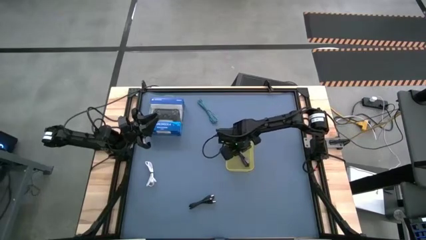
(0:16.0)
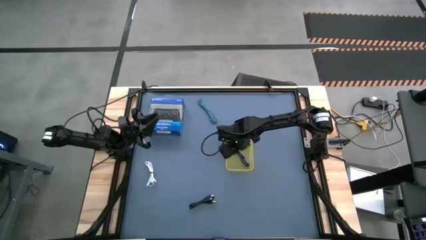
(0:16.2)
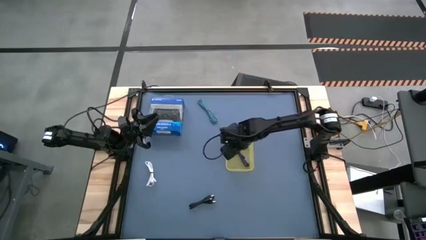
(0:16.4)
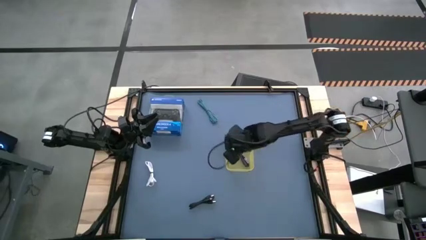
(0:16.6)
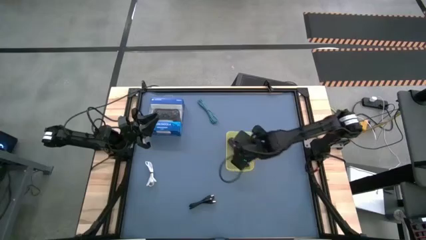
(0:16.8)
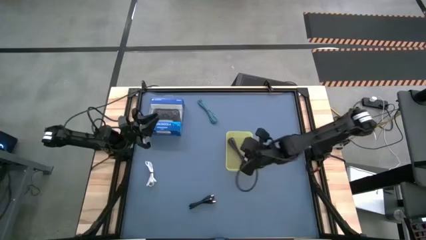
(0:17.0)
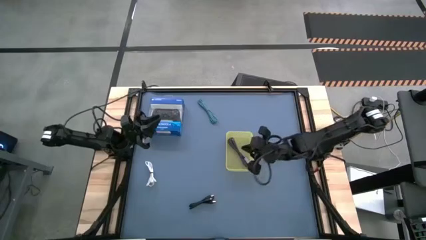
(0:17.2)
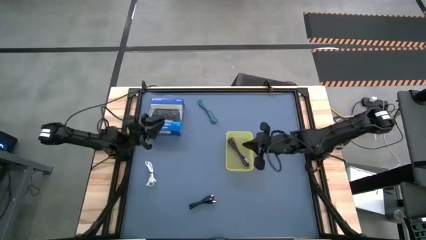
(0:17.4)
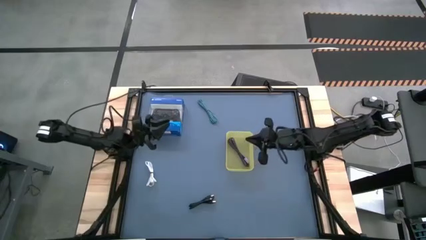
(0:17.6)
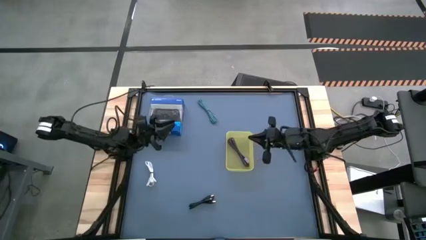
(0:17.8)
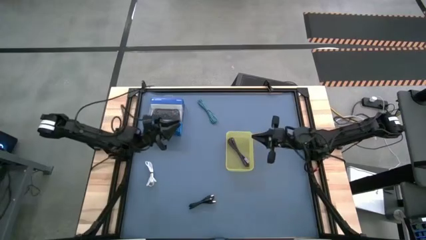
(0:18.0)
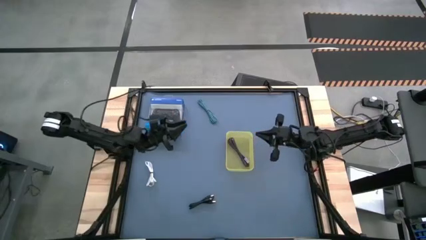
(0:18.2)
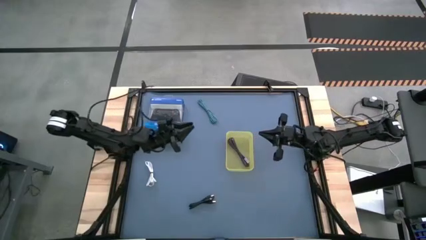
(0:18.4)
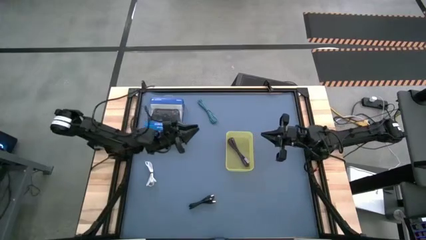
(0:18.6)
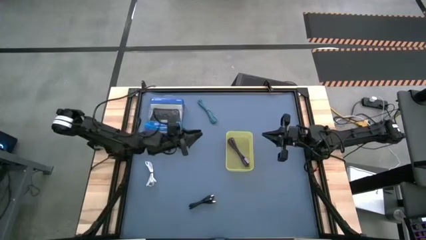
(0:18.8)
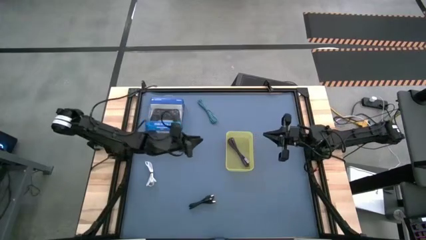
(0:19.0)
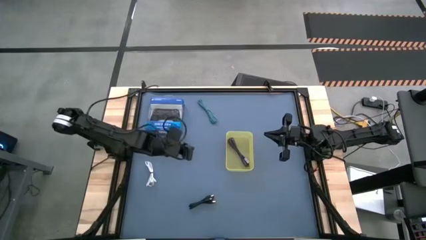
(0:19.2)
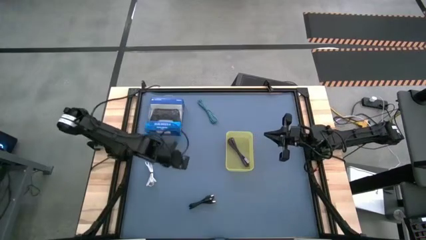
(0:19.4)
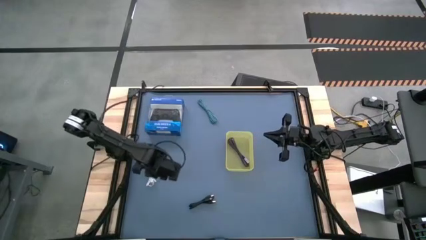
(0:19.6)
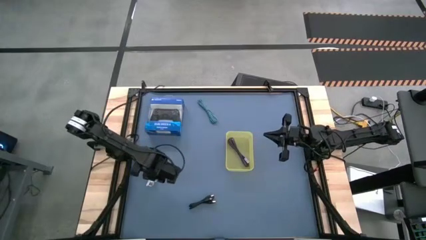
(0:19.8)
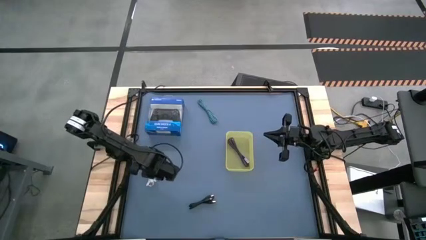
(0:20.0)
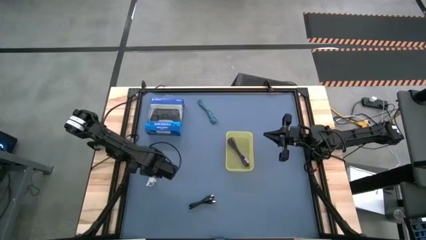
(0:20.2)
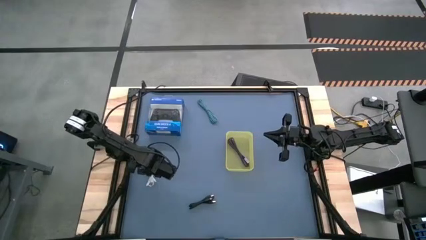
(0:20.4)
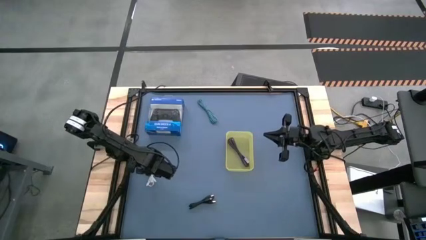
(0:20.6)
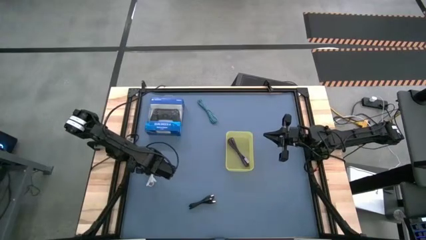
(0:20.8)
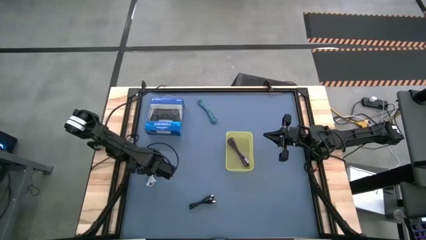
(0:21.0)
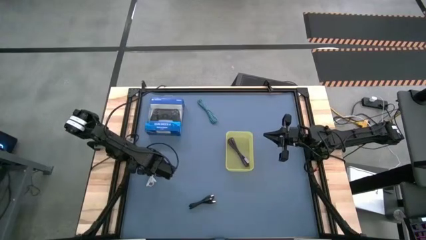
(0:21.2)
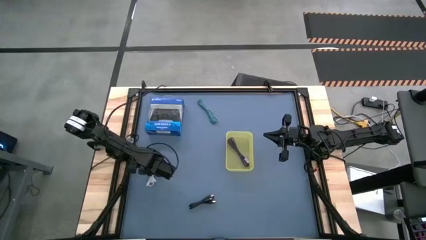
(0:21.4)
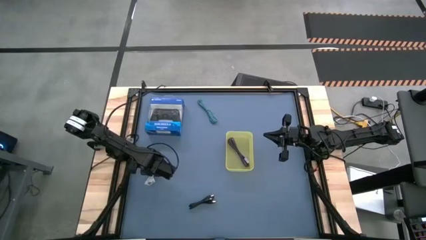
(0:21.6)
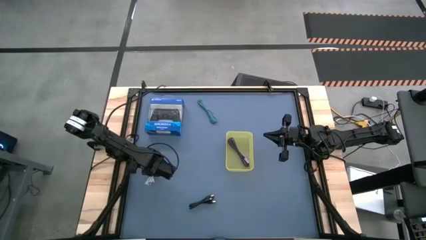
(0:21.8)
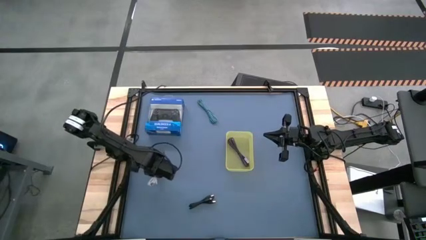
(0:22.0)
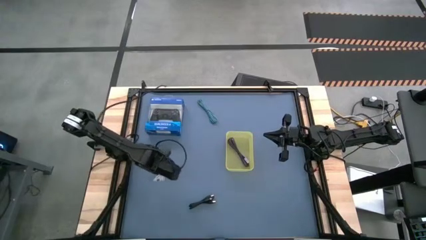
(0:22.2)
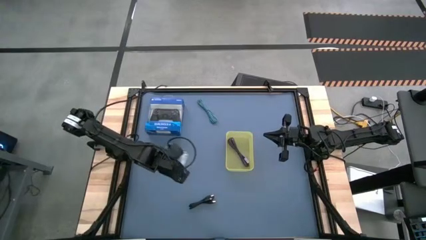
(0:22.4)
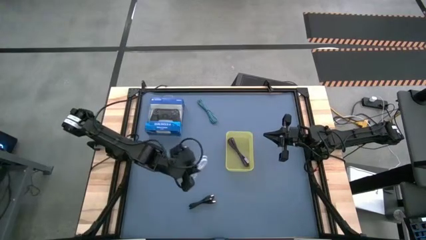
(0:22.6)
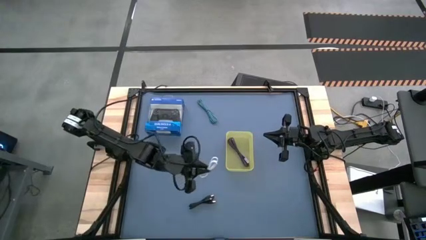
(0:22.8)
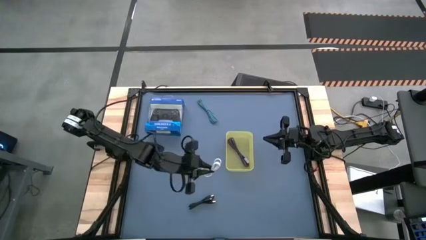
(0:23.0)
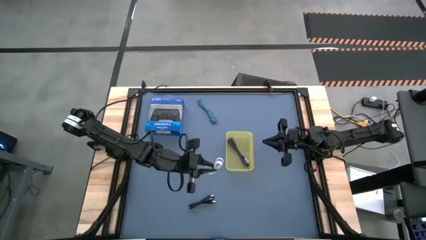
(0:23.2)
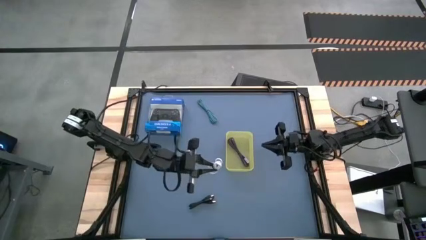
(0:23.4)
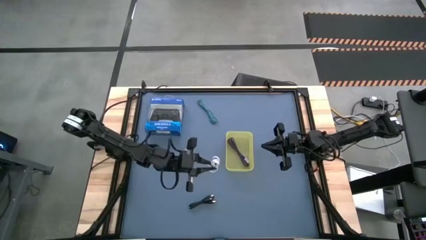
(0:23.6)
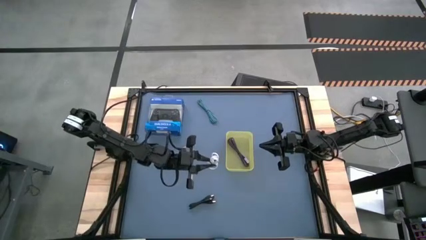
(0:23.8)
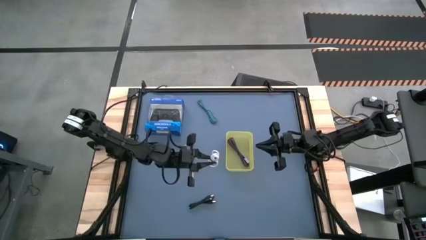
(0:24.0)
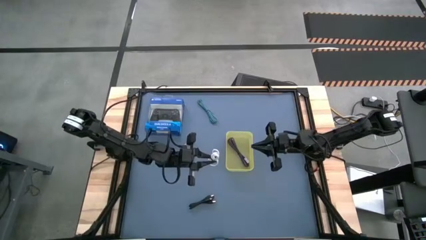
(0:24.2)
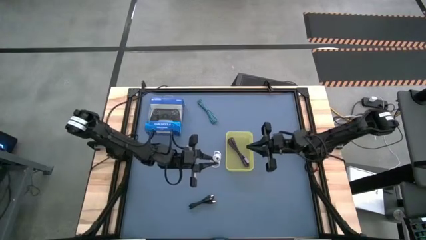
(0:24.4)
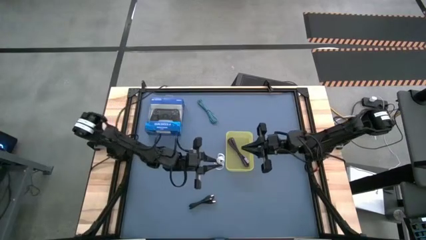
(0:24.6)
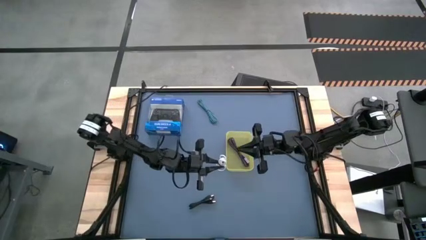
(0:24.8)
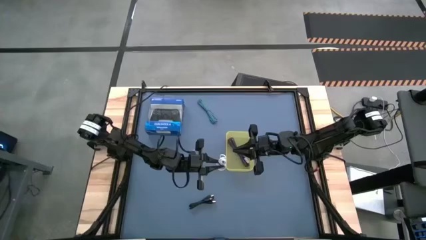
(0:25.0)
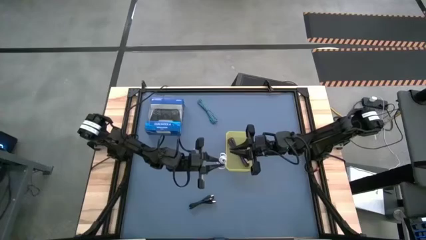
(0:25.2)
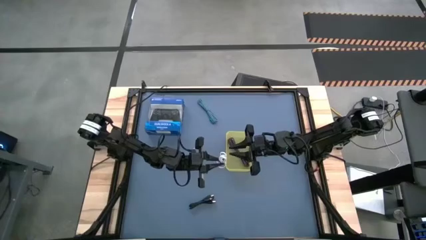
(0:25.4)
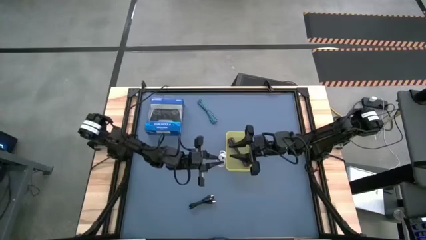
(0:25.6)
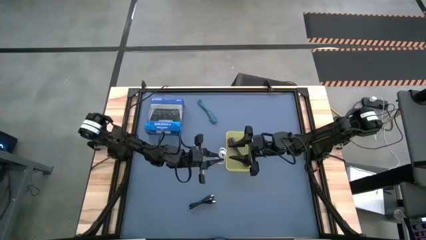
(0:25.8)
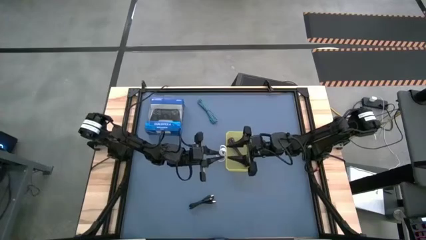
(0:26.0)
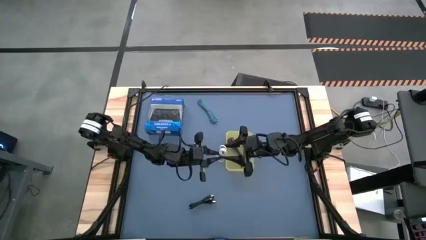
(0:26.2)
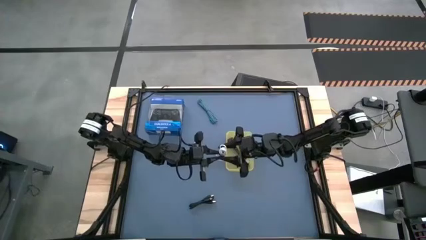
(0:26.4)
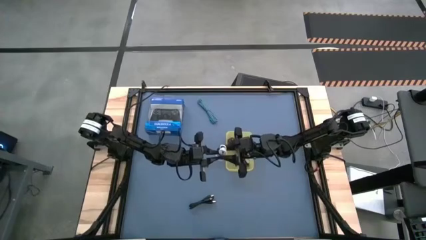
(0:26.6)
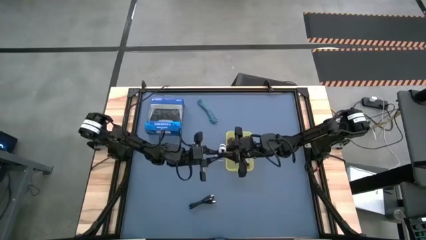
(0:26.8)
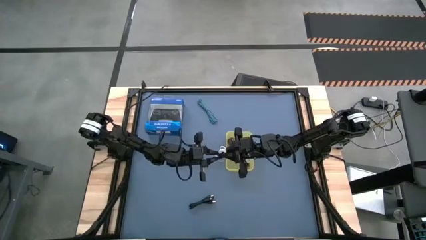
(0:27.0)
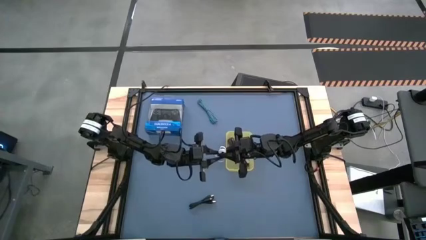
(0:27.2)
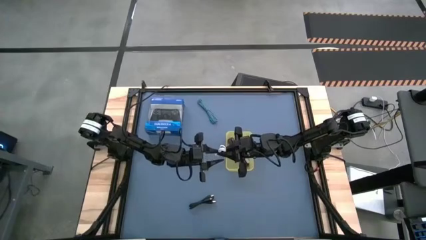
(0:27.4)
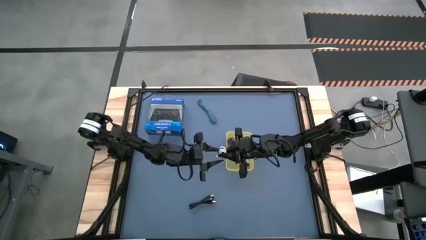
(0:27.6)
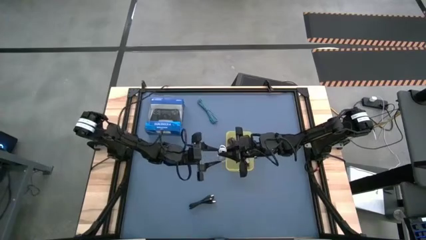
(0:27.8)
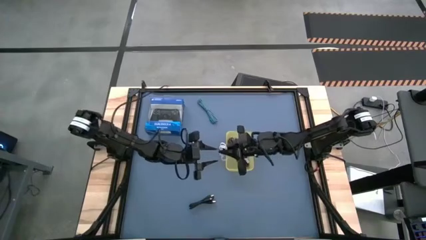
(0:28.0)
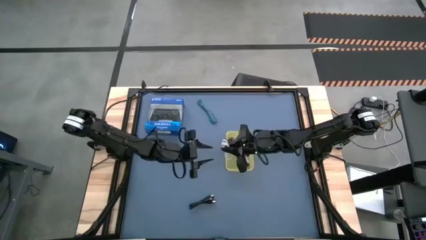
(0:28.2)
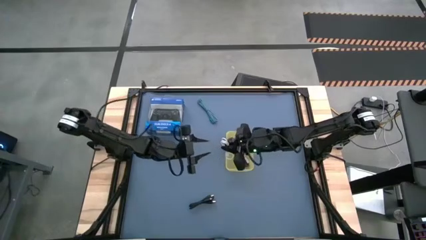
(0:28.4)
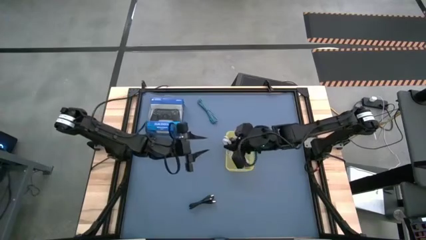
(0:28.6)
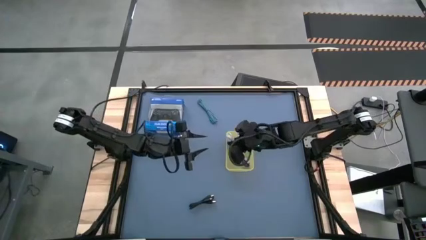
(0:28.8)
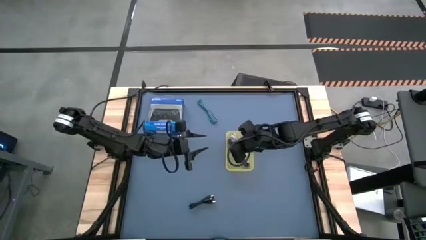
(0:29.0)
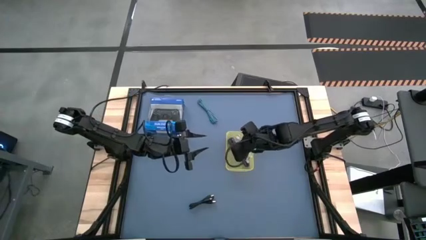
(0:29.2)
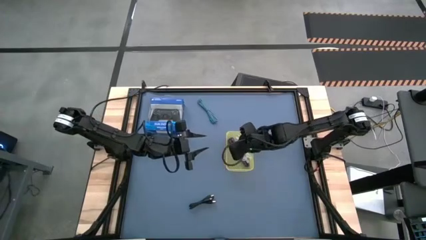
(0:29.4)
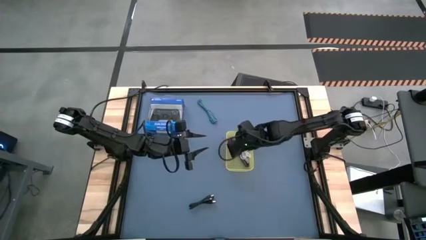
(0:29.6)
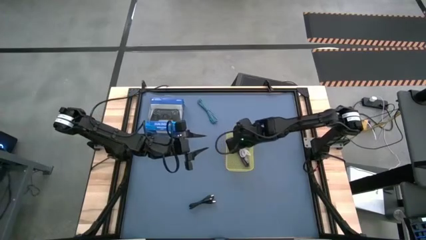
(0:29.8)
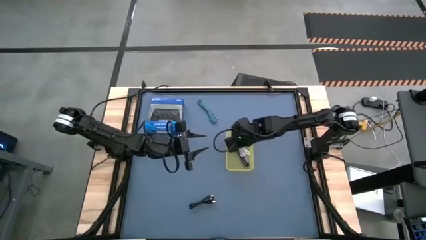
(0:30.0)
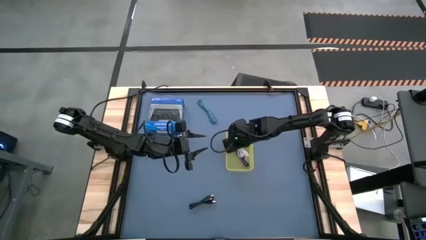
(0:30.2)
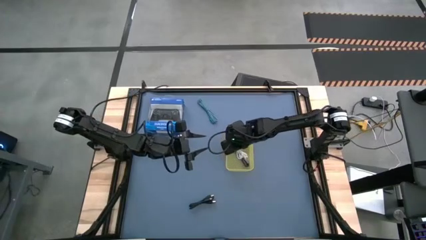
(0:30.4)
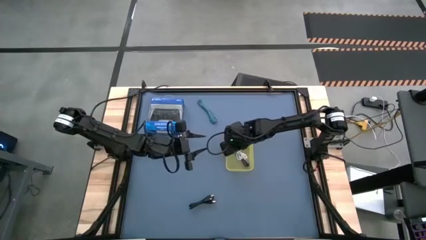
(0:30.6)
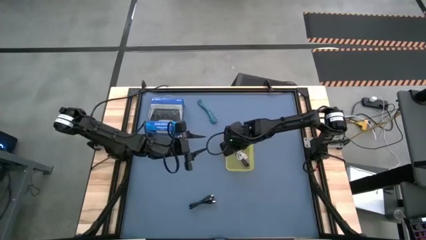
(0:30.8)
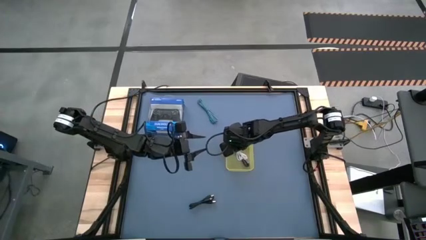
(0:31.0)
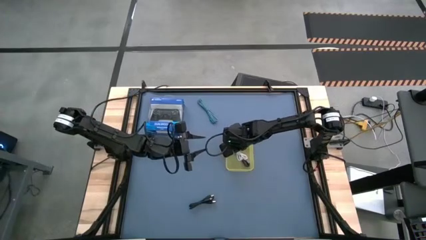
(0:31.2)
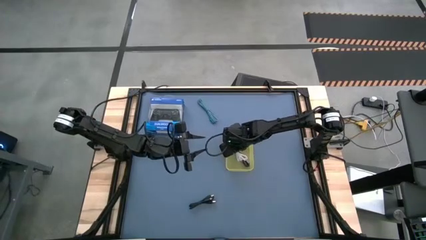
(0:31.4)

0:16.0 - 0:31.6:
Task: Pick and place USB-C Cables
Put the white charger cable into the yellow bin

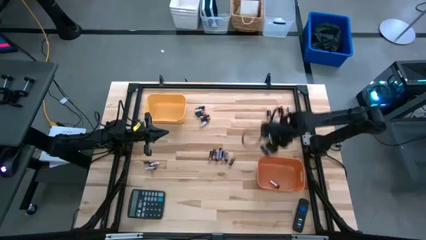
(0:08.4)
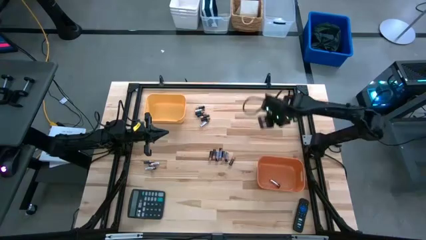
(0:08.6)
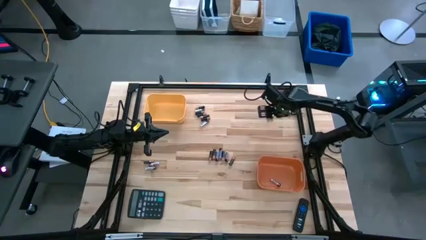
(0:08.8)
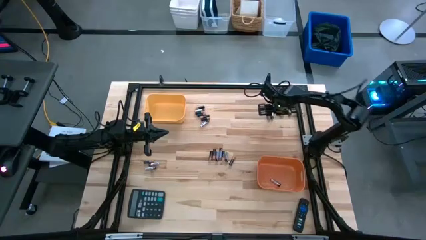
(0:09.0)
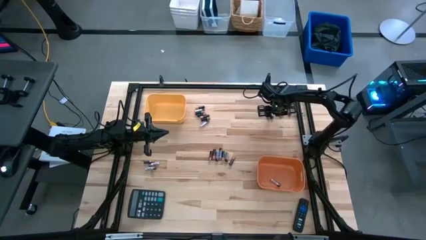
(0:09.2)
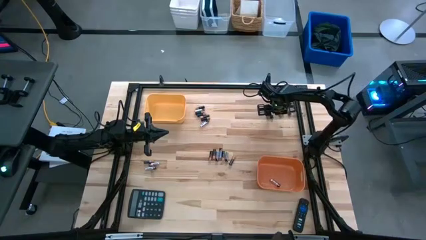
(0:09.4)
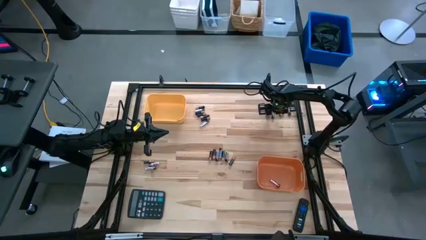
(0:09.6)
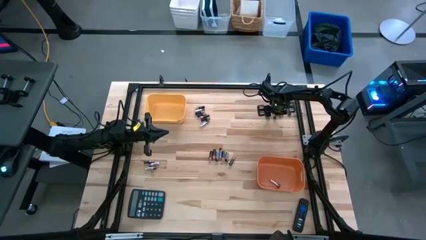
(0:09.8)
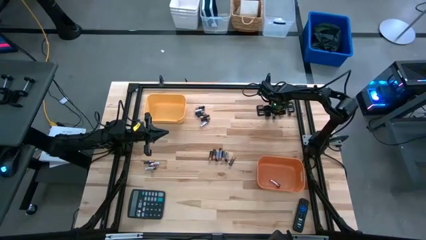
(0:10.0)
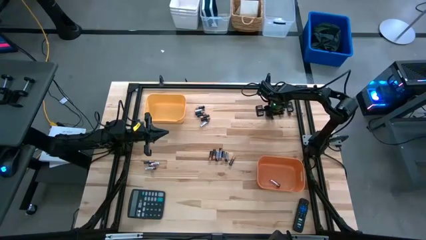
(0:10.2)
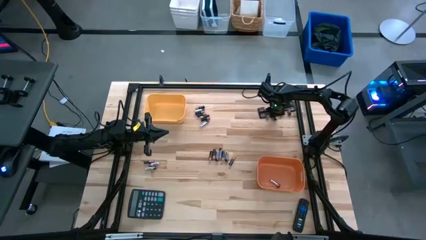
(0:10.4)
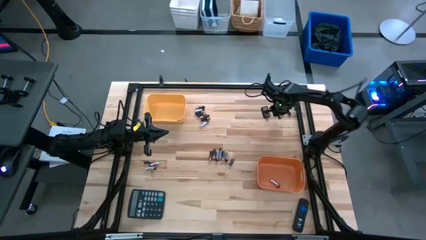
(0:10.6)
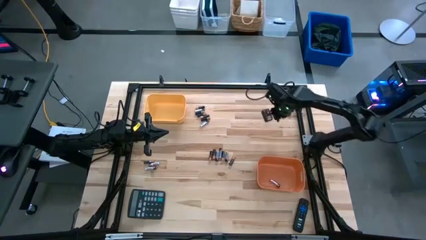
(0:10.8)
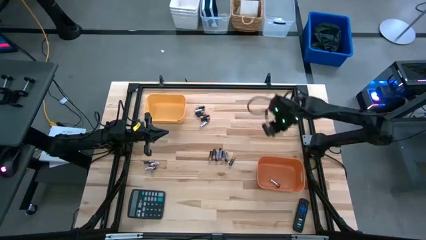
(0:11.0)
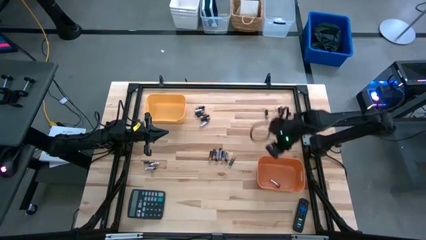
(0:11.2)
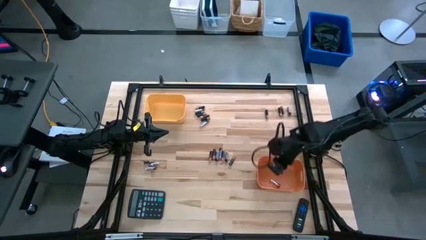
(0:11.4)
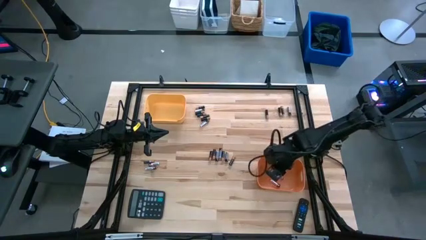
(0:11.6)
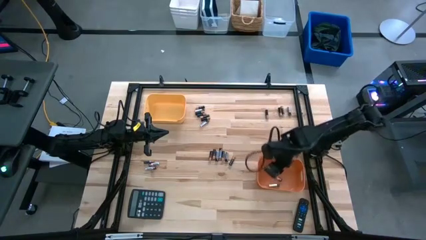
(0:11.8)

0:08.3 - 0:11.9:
Task: Sort batteries
Put the silver battery into the orange bin
